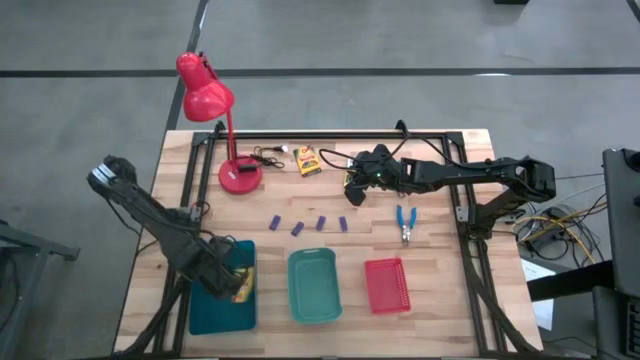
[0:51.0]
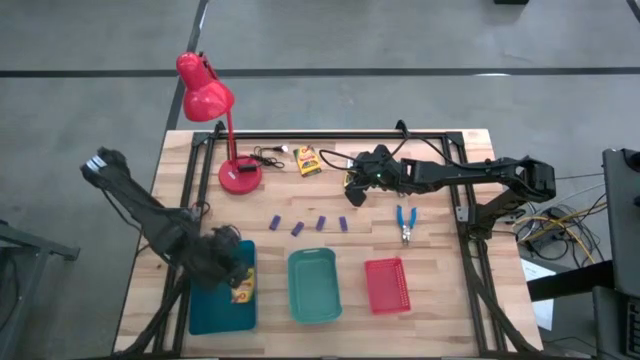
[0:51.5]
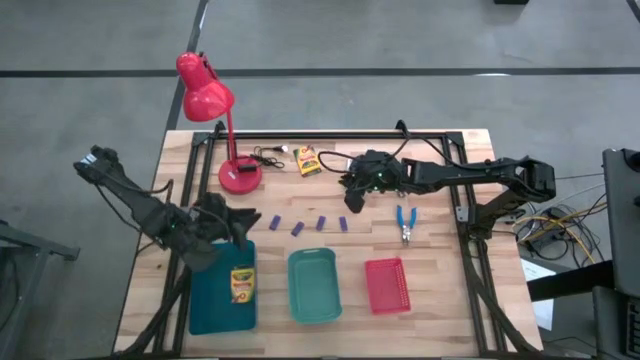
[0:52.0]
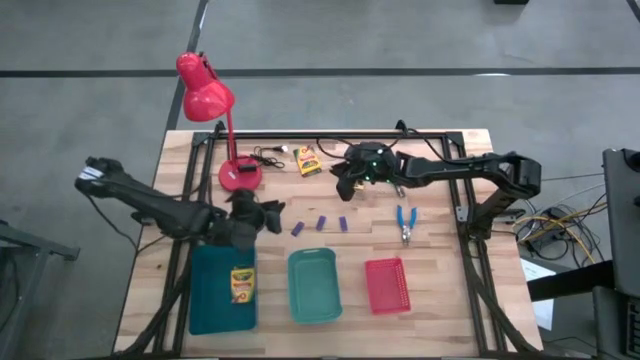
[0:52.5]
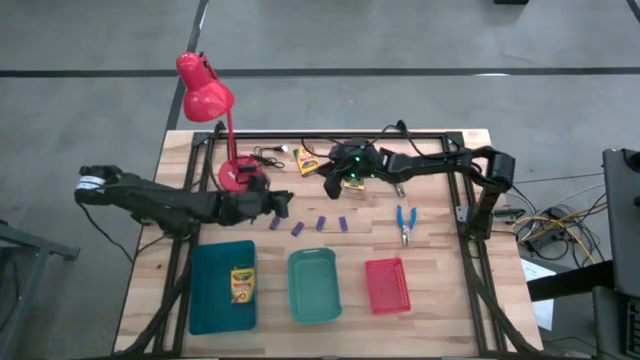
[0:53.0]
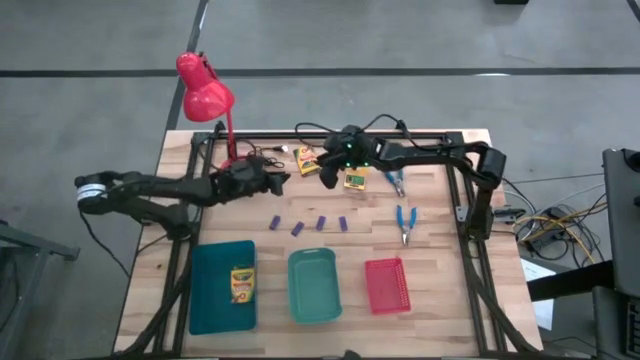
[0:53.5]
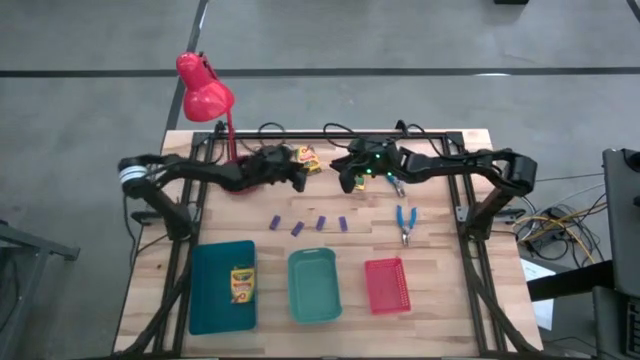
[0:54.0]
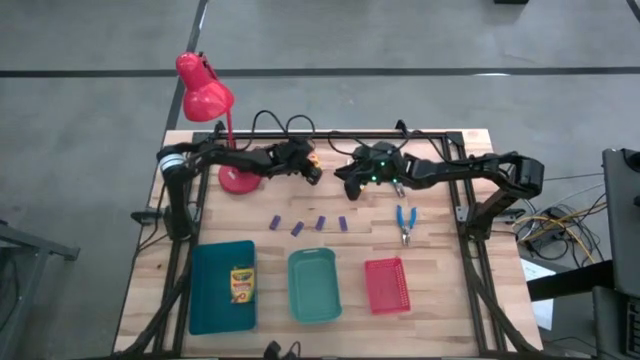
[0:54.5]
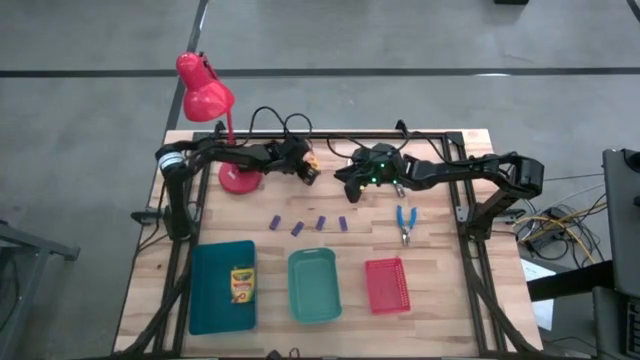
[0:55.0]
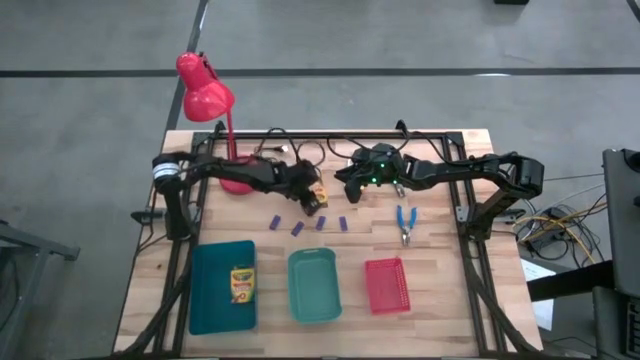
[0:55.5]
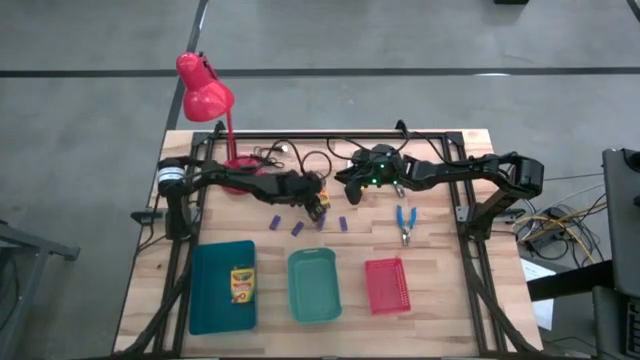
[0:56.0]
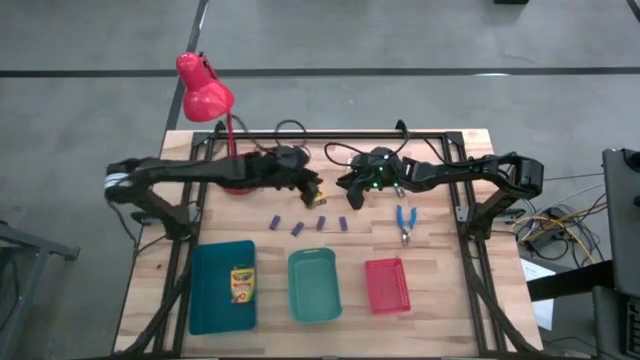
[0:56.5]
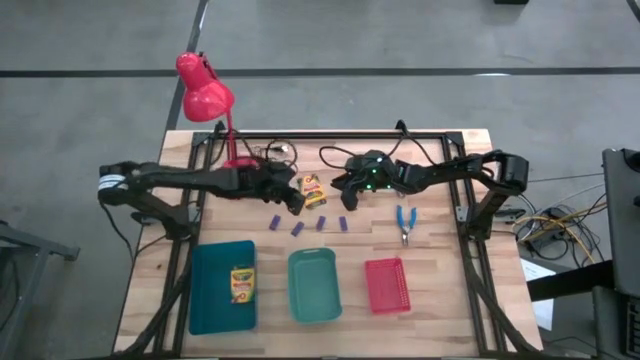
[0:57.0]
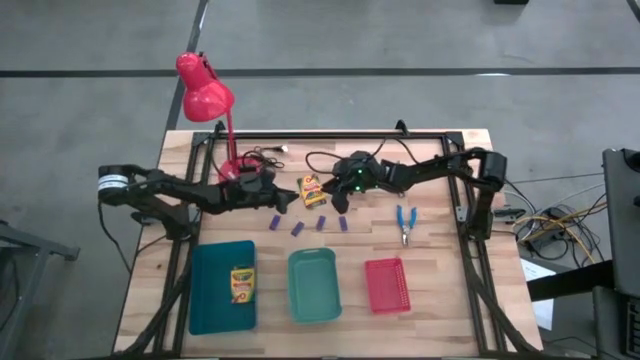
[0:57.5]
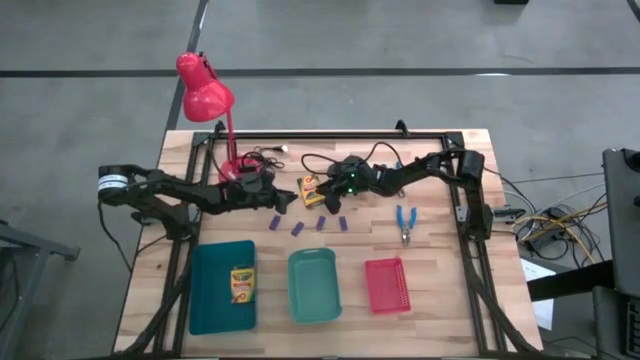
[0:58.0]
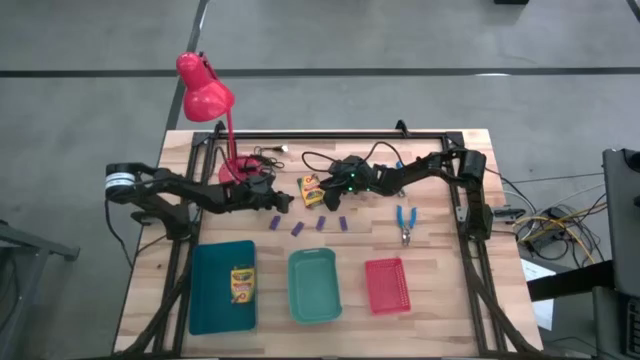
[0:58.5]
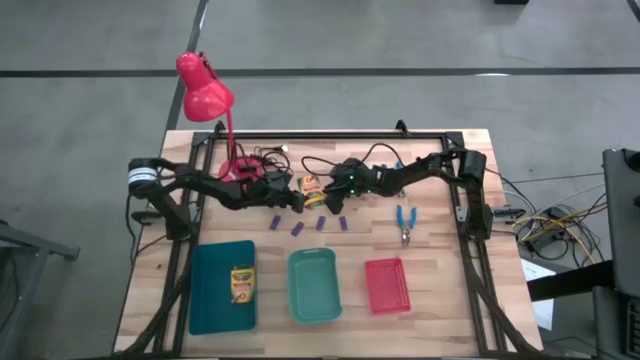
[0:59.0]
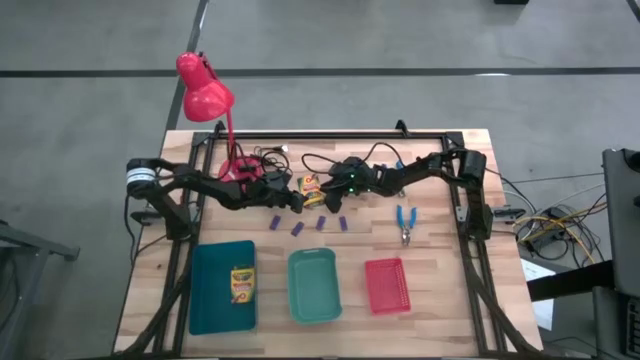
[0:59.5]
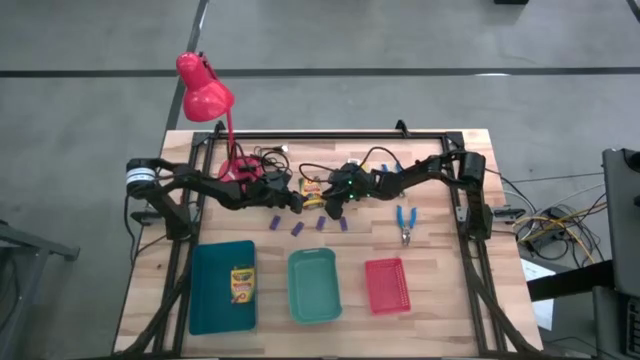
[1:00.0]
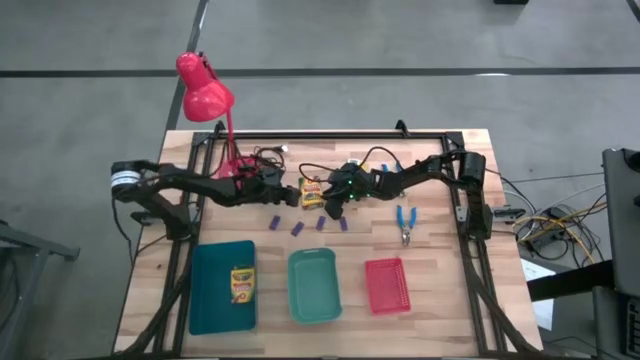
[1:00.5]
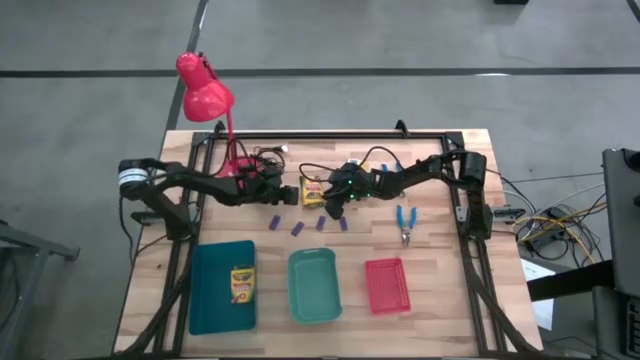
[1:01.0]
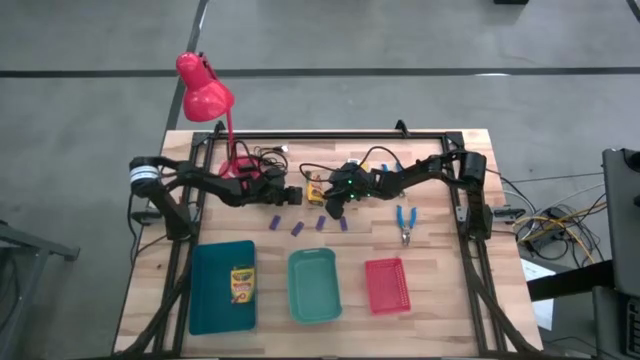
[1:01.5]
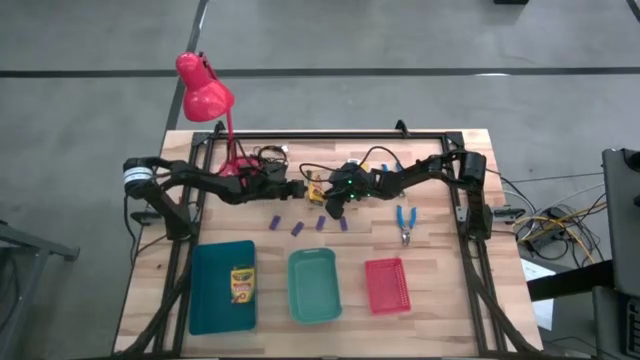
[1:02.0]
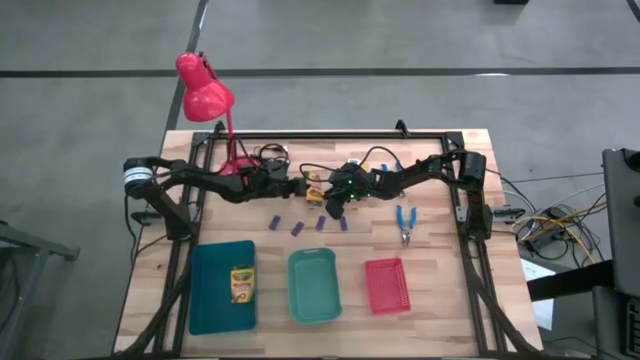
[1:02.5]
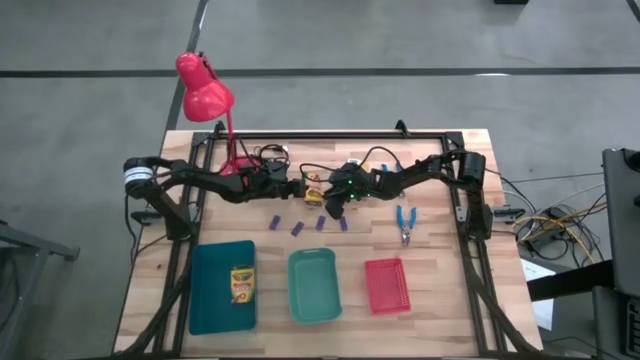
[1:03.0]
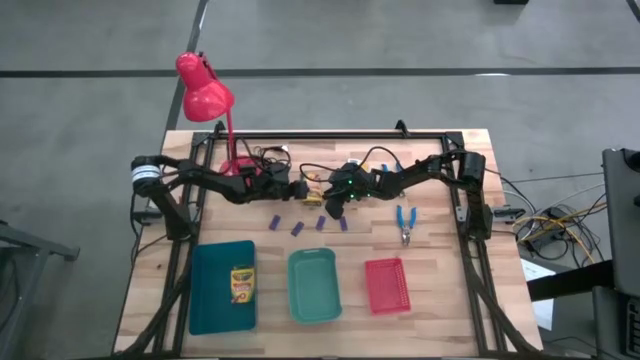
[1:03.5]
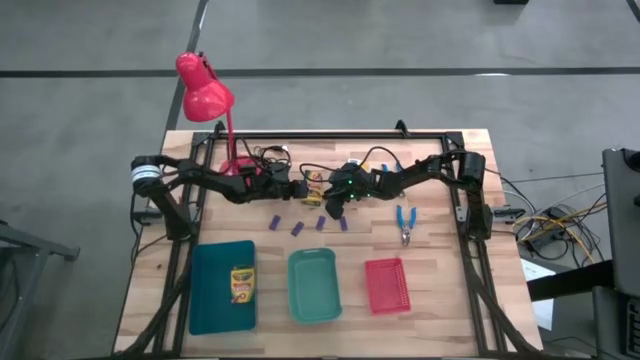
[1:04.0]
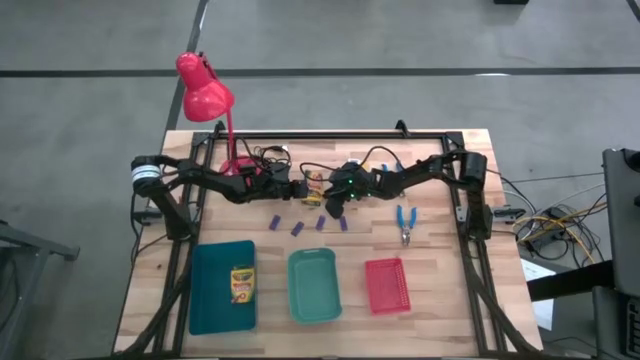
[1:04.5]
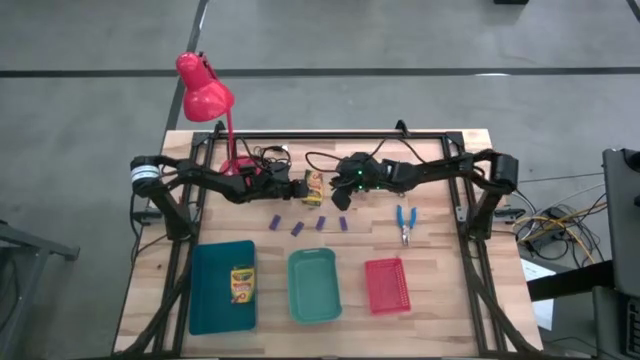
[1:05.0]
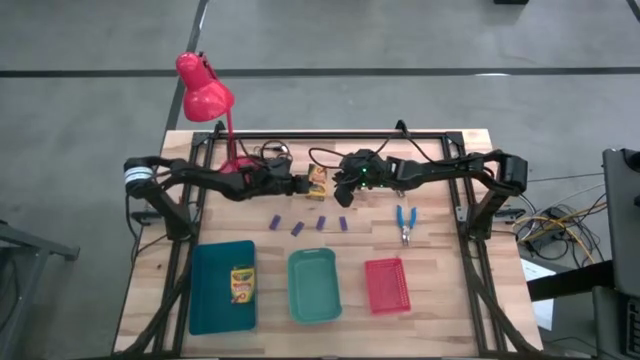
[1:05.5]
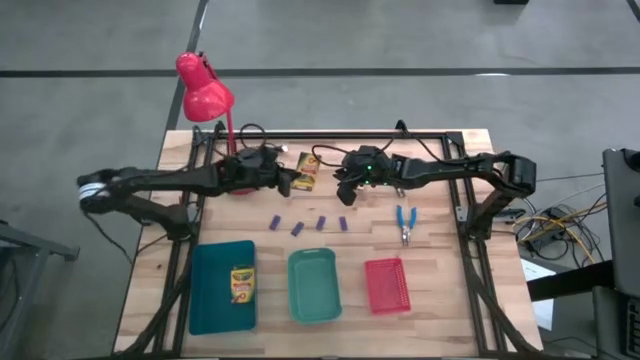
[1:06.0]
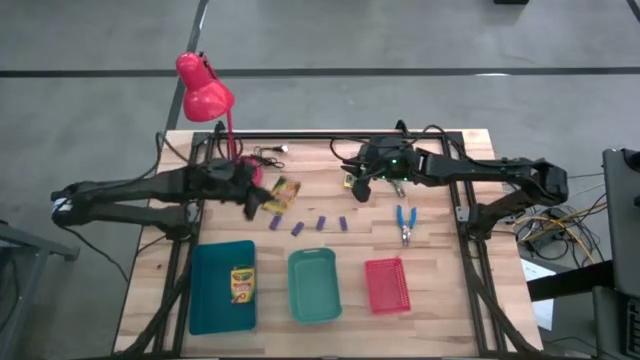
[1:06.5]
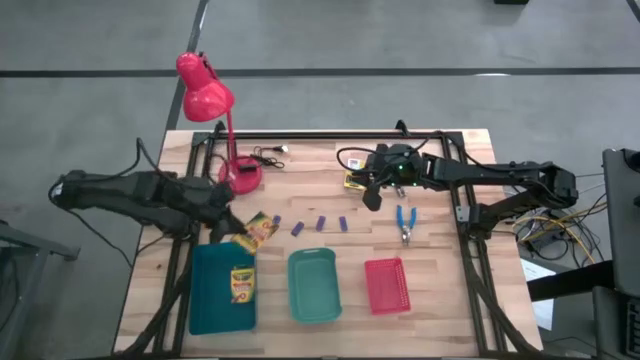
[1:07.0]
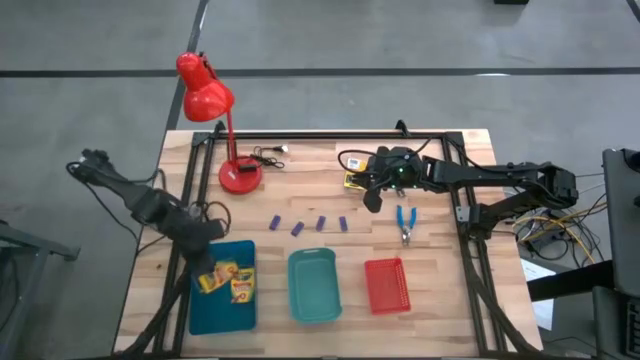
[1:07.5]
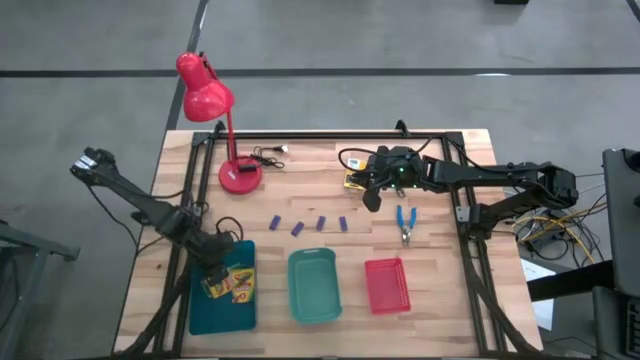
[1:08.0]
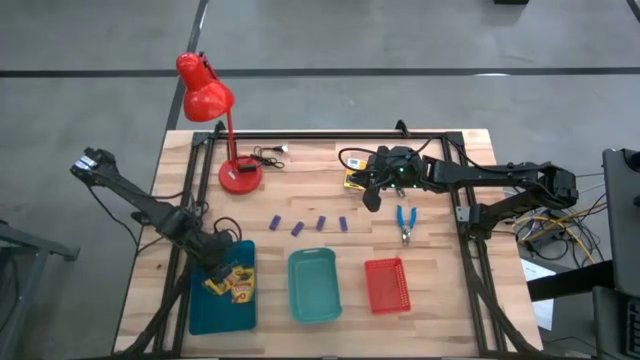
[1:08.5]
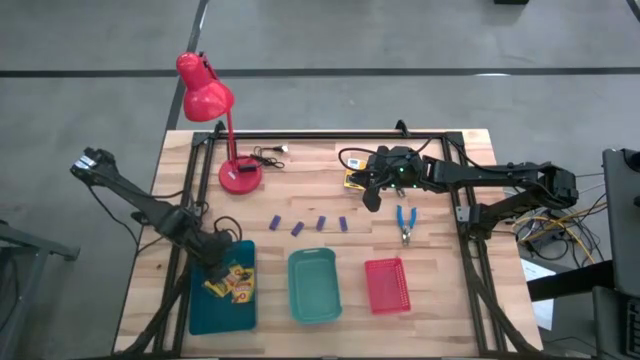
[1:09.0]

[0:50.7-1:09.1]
Task: Pick & Place School Supplies
Put the crayon box into the blue bin

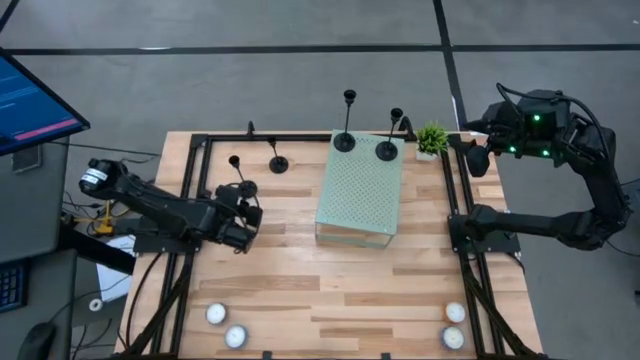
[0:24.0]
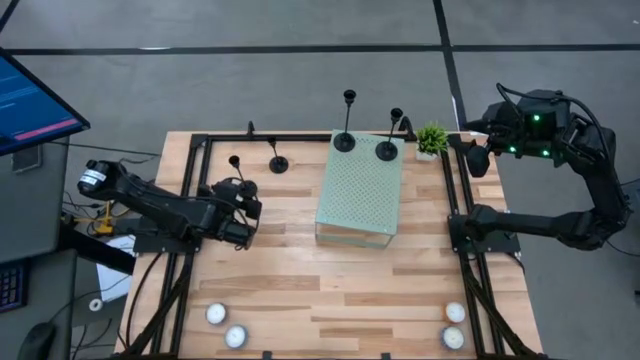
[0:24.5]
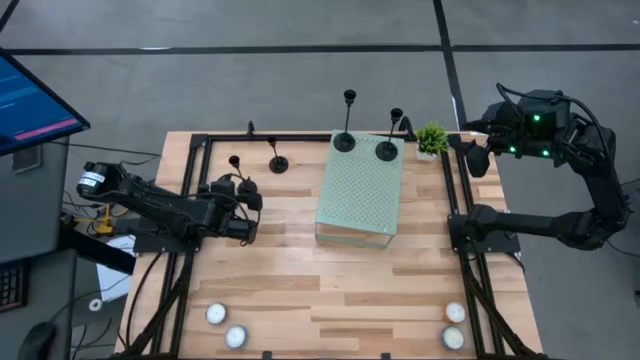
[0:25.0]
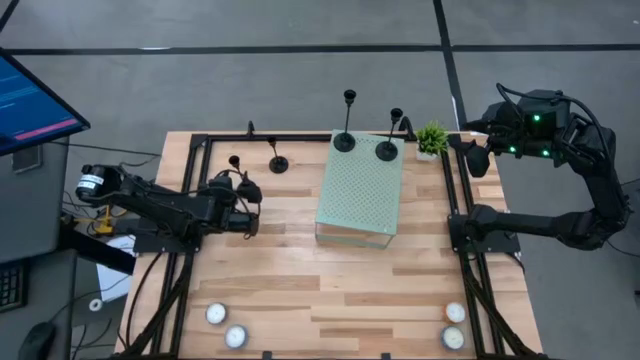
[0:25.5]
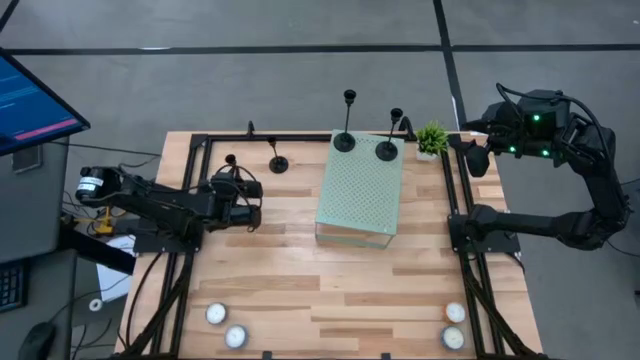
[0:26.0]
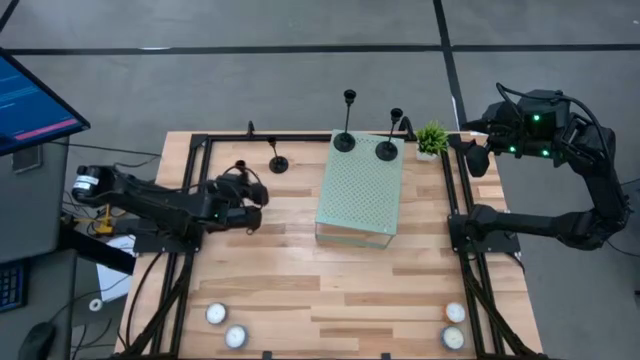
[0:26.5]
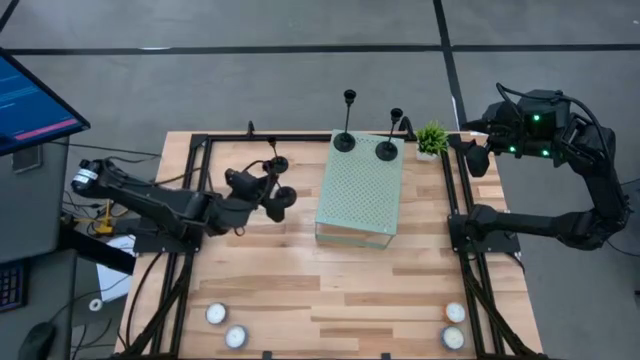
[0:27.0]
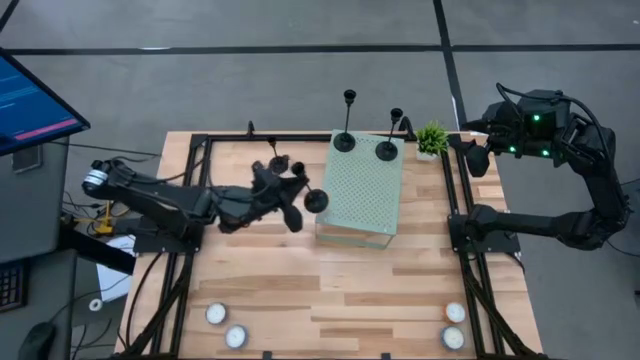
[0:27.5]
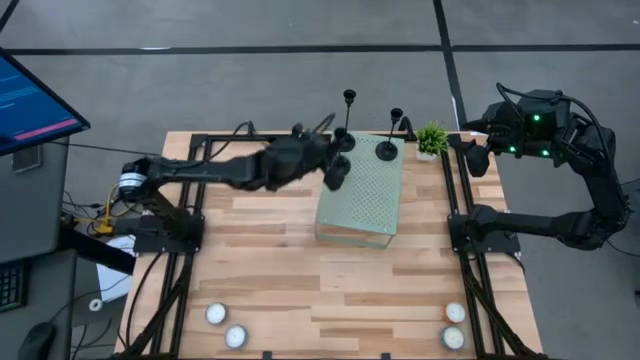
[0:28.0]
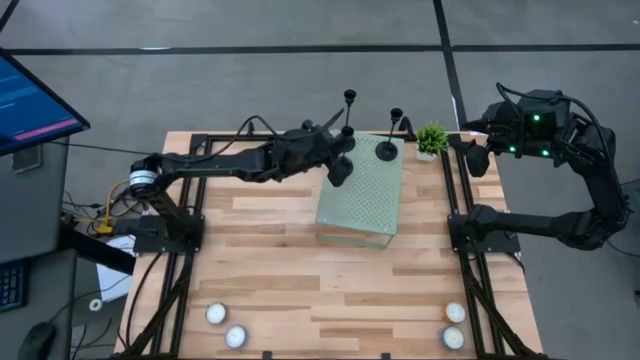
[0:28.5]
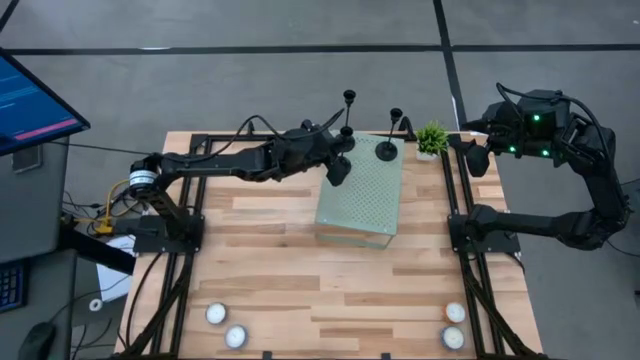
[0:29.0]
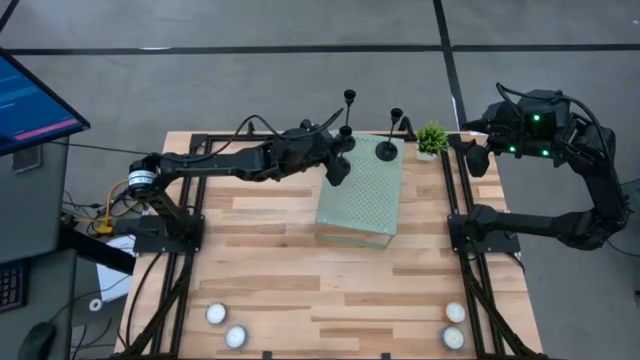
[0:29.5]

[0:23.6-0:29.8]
Task: Pick & Place candle stick holders
Put the black candle holder on the shelf
